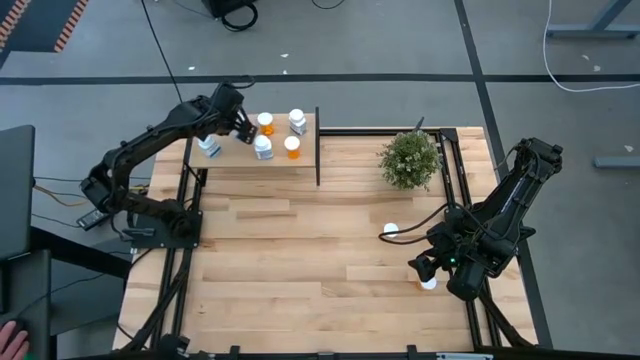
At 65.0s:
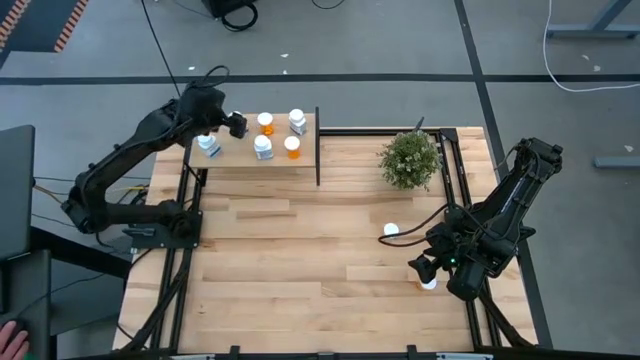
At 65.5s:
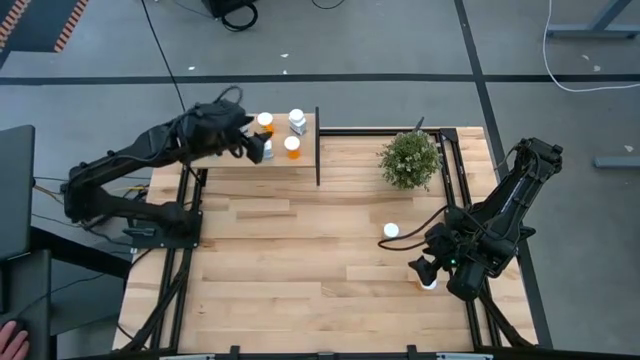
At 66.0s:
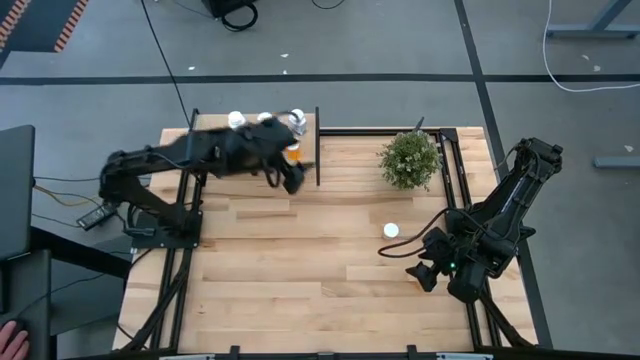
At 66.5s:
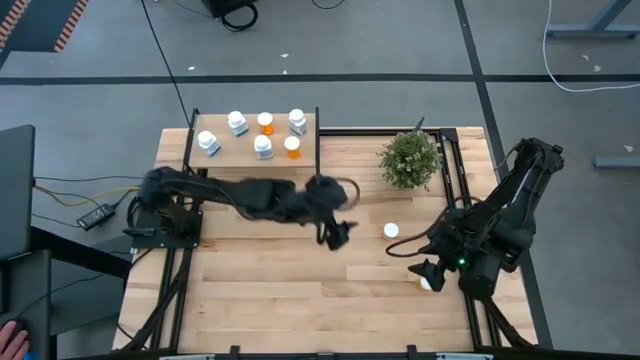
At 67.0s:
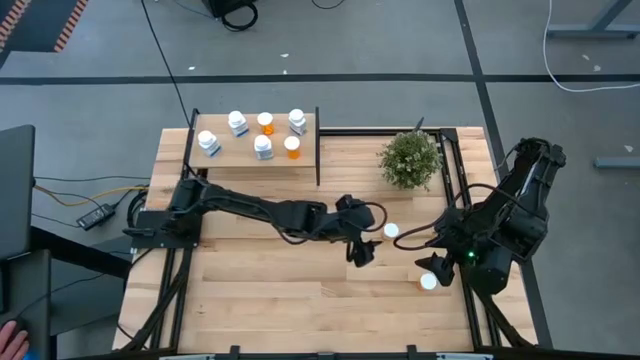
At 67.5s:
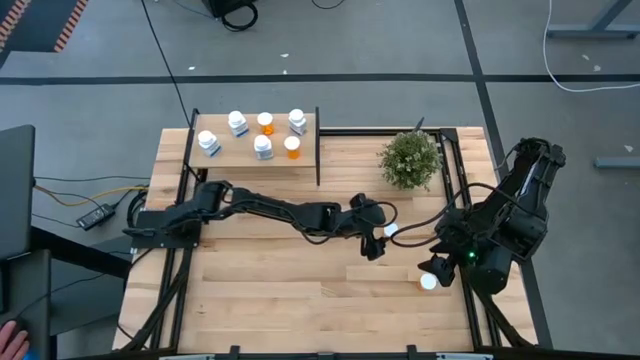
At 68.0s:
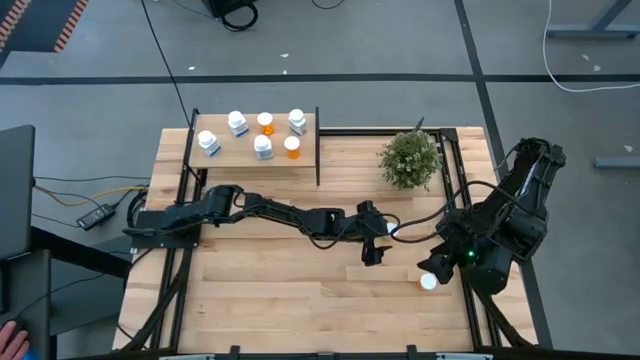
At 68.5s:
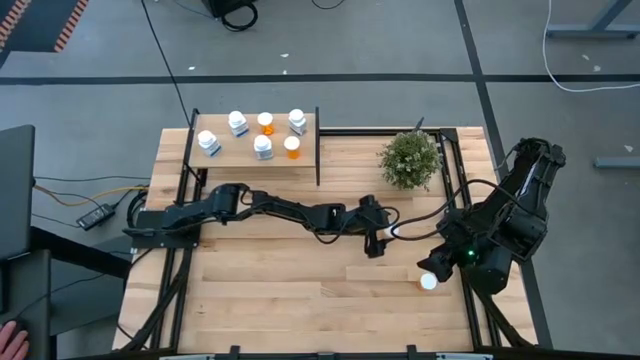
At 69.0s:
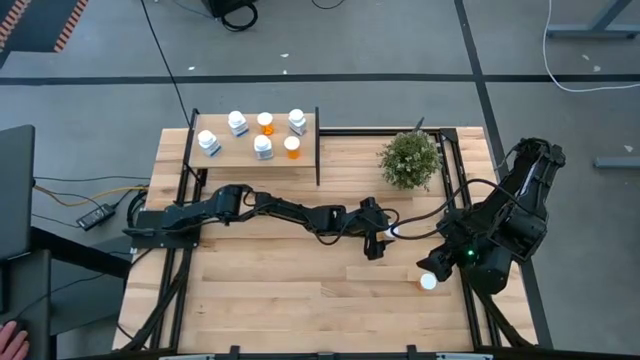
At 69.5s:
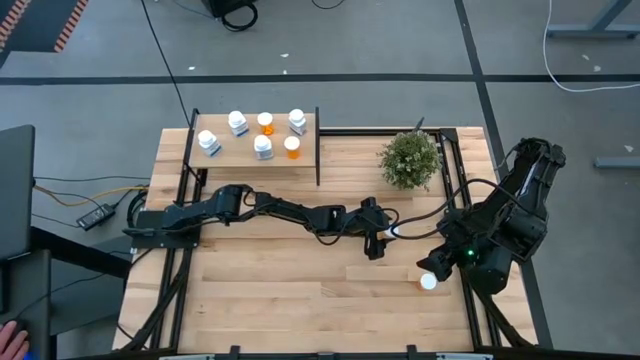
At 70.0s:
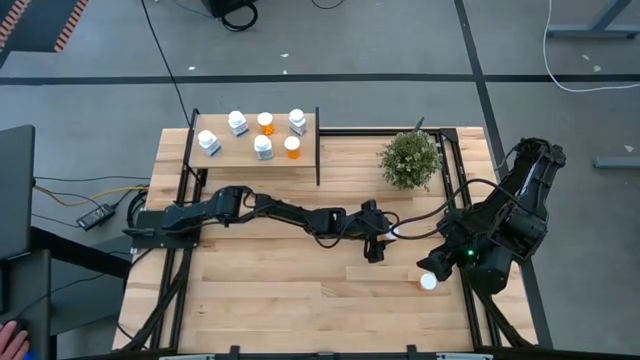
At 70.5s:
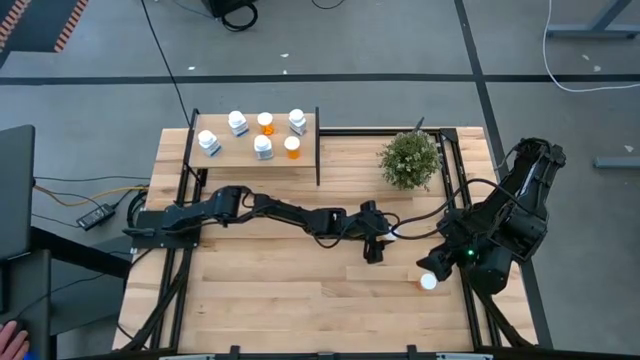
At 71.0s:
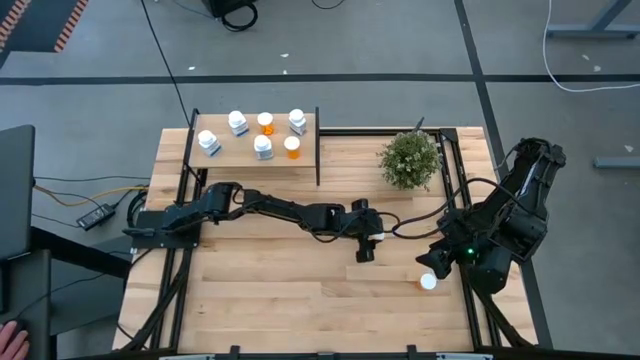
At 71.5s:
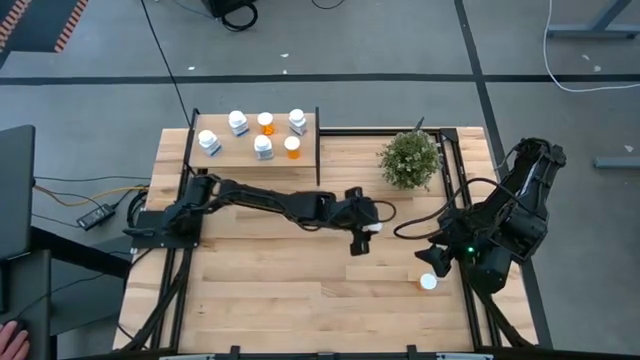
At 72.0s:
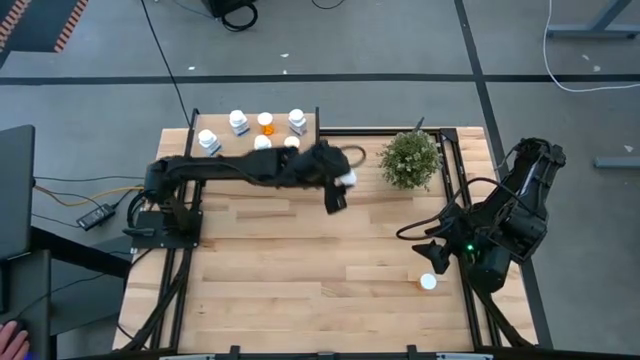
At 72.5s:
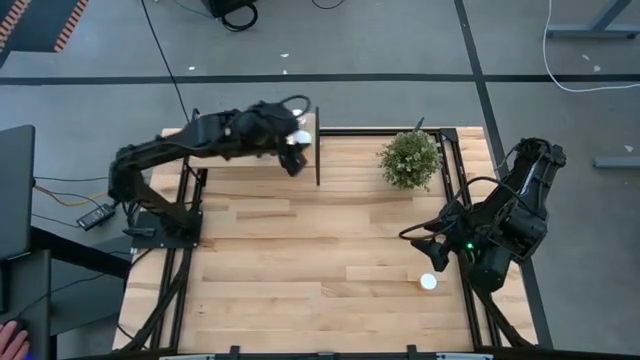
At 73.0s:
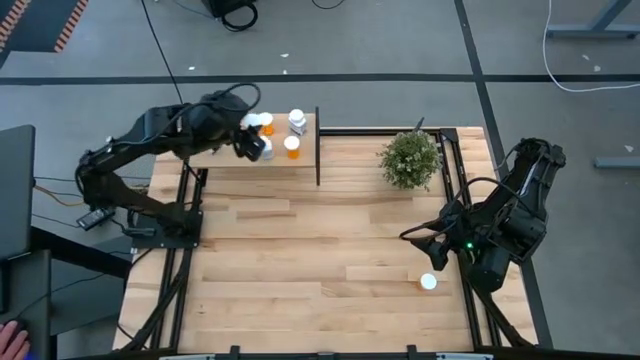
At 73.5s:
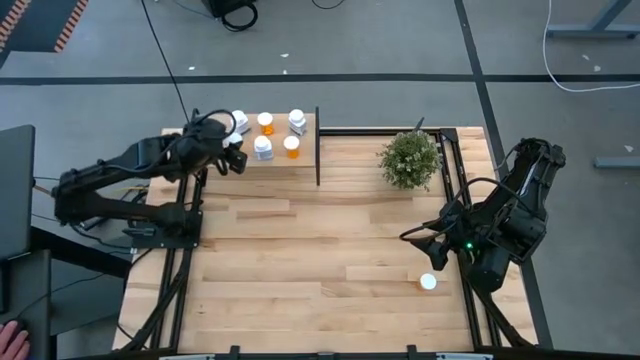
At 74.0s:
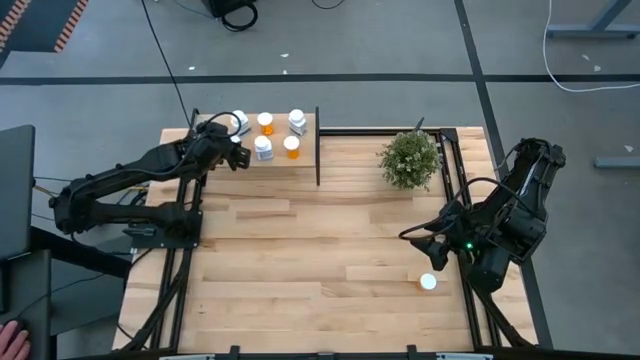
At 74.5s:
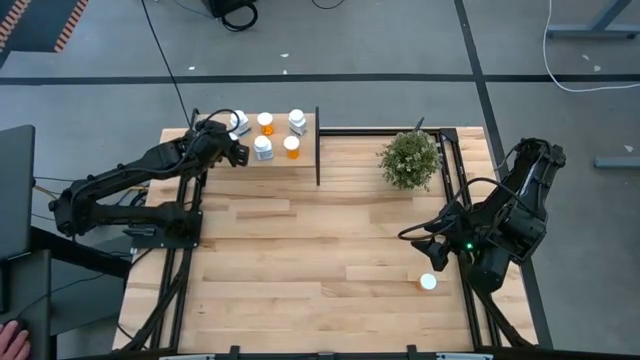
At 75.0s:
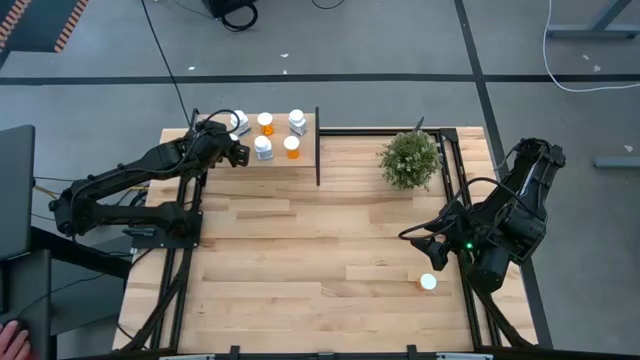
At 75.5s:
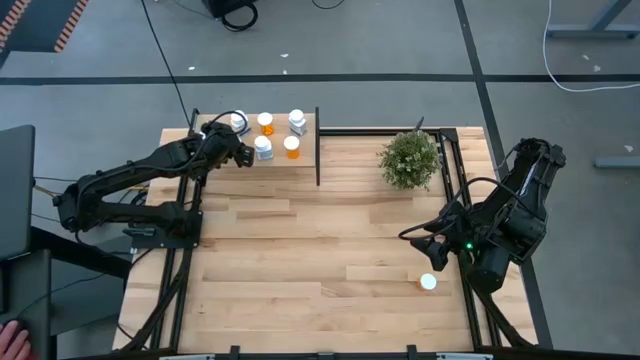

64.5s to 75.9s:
Task: Pick and place medicine bottles onto shelf by color
Put the orange pill bottle on the shelf

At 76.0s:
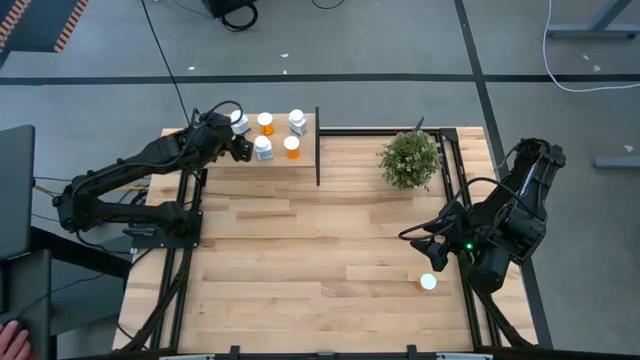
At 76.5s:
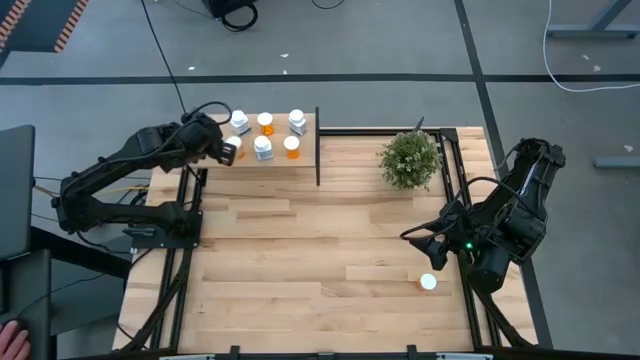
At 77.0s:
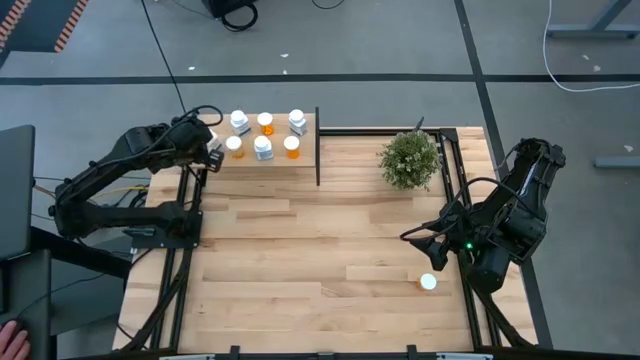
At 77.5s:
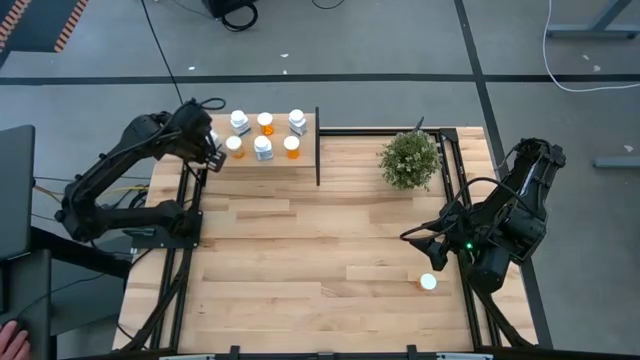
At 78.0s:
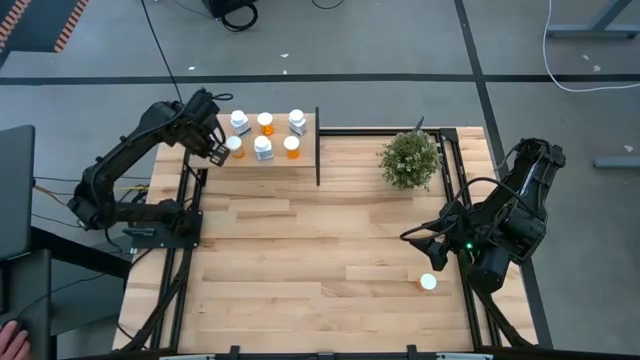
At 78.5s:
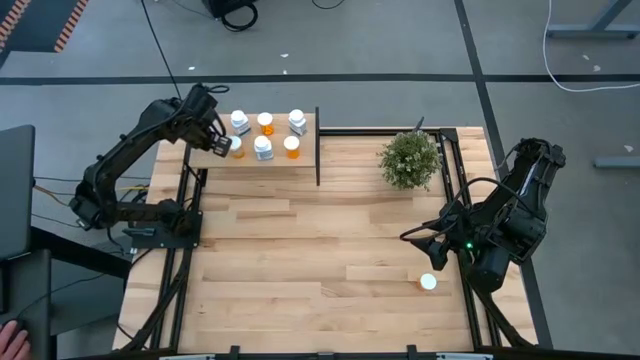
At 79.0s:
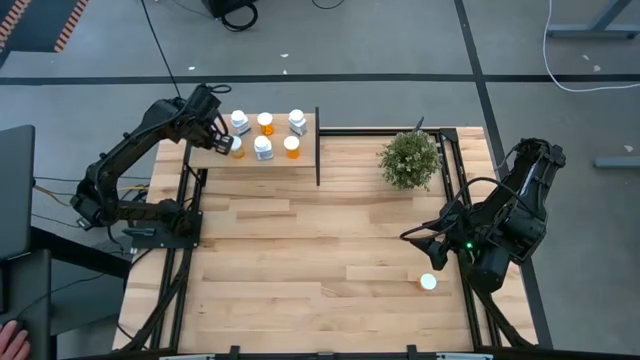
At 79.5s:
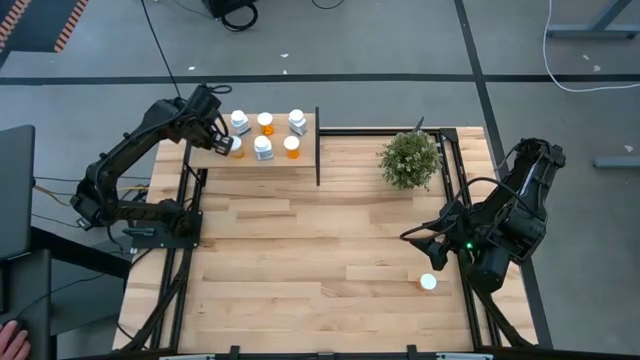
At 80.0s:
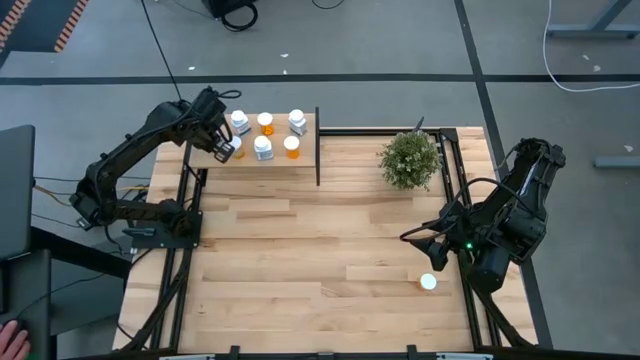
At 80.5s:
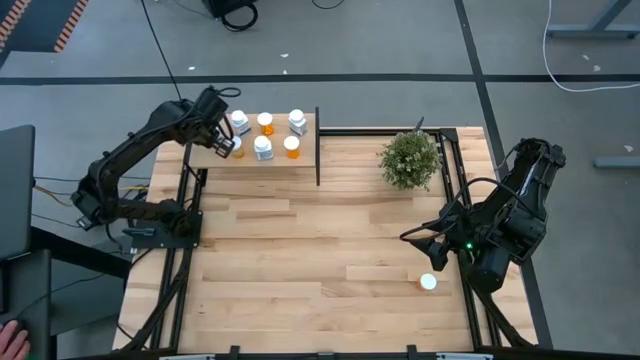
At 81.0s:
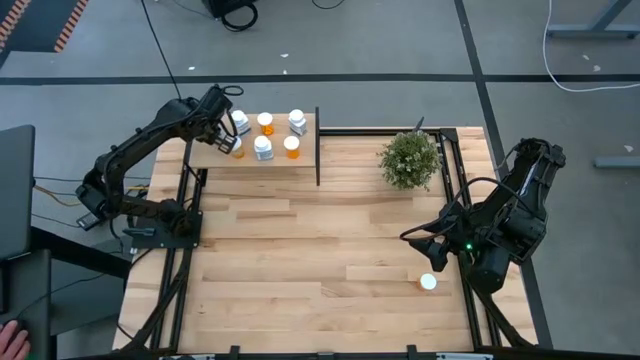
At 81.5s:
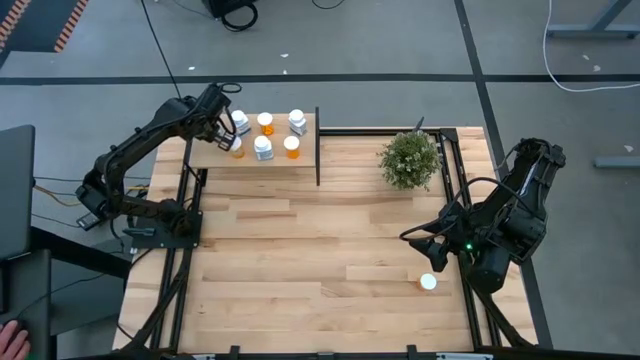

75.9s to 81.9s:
Adjust the supplement bottle on the shelf

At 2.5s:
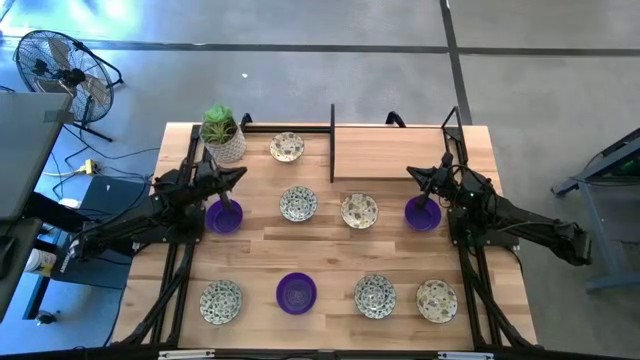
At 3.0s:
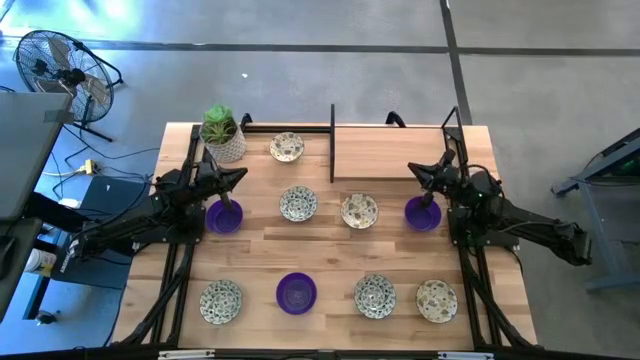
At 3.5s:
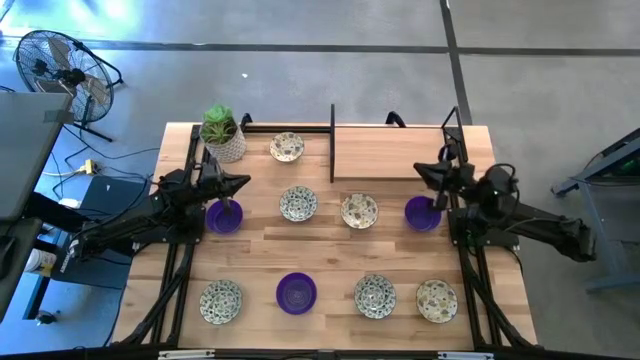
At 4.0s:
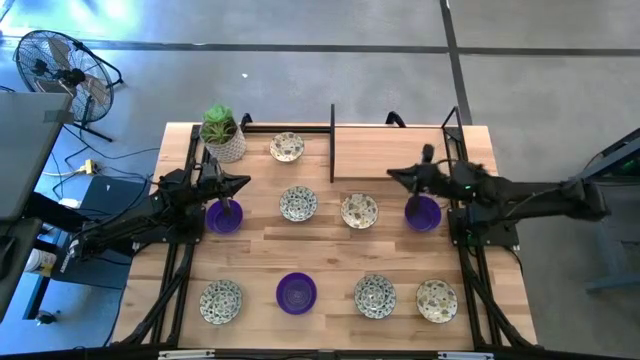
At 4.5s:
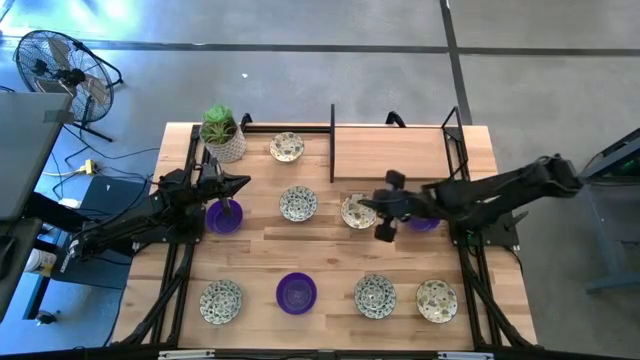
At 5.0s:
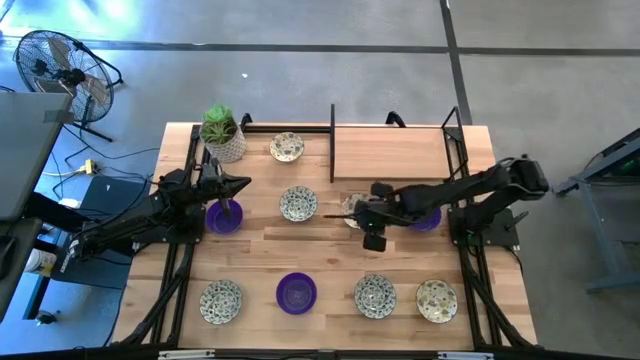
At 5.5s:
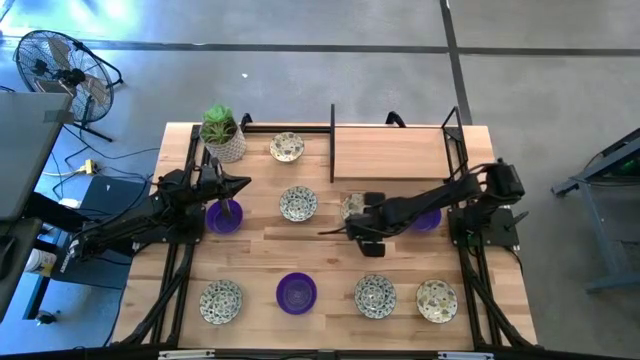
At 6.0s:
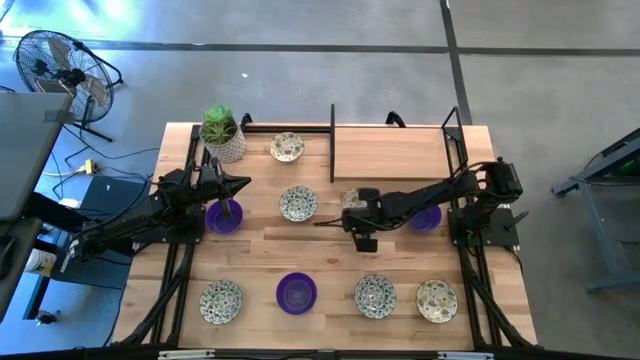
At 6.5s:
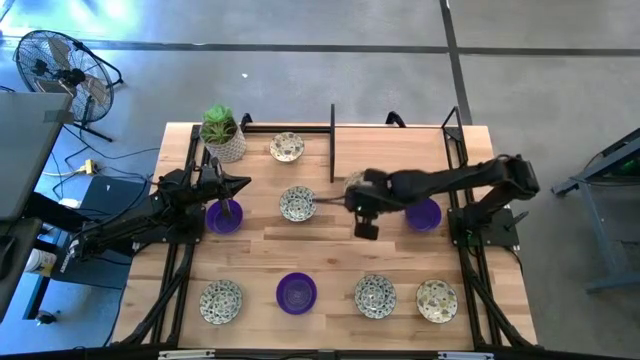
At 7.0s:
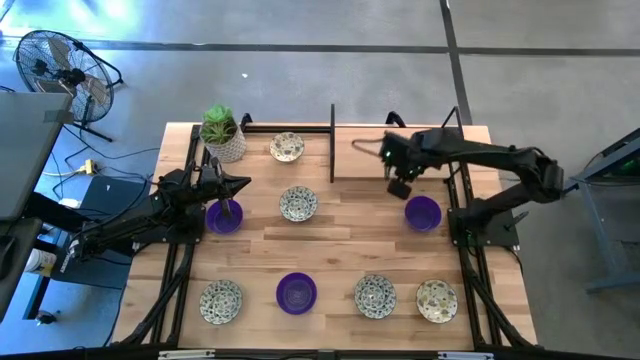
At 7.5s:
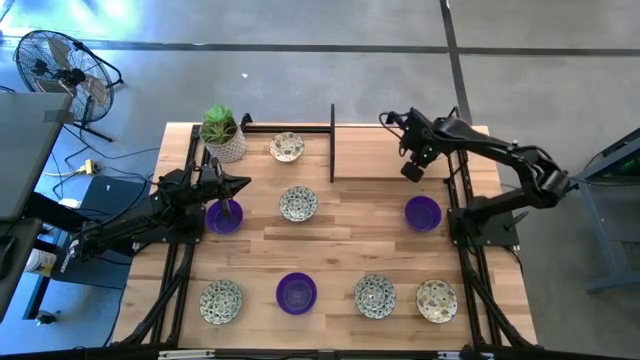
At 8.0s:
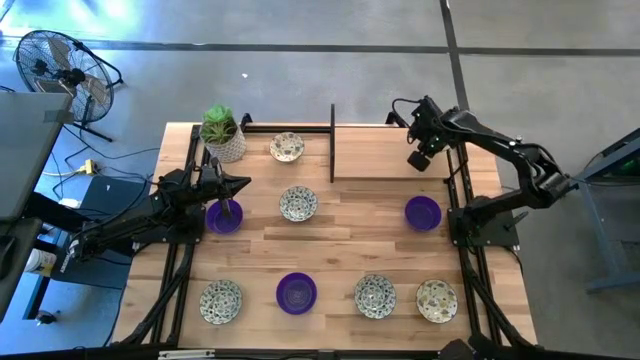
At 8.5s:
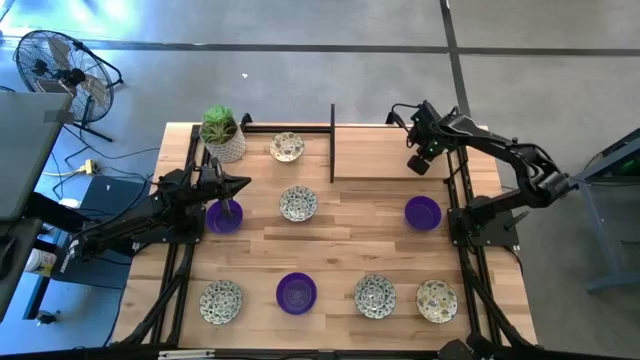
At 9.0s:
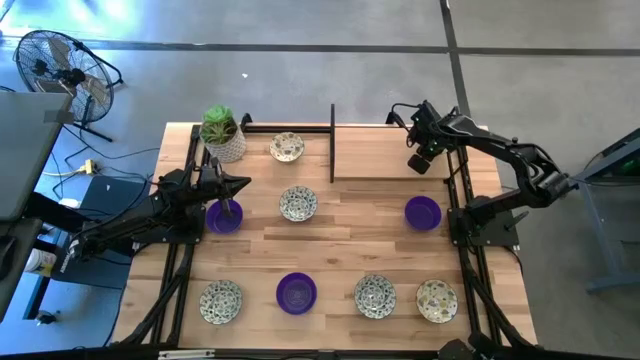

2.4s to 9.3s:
Task: Pick & Place Mini bowls
Put the middle yellow bowl on top of the shelf
